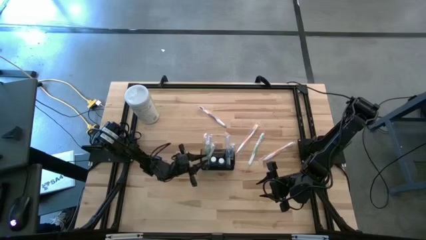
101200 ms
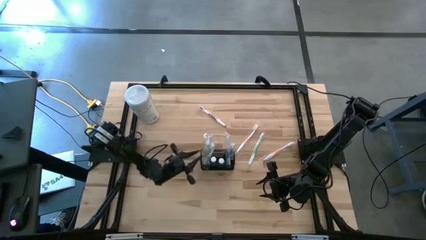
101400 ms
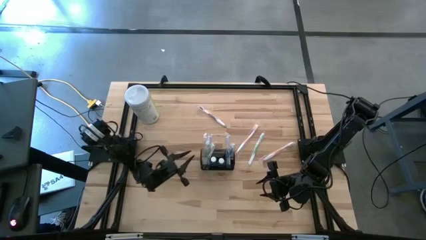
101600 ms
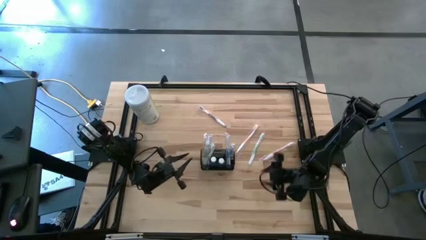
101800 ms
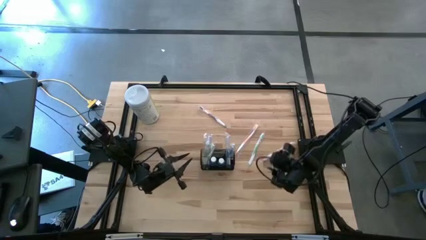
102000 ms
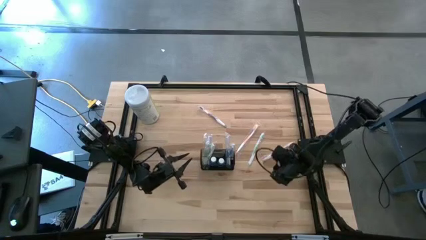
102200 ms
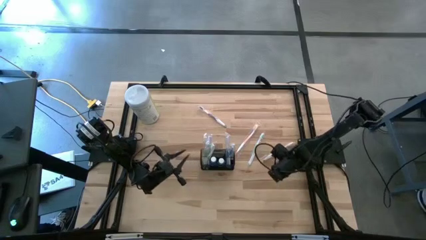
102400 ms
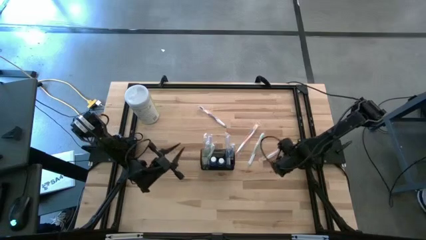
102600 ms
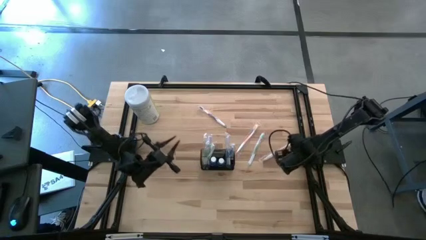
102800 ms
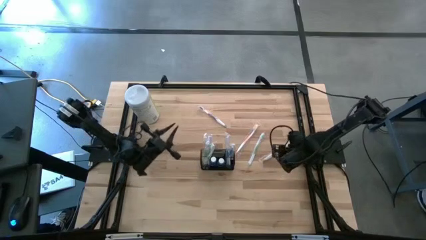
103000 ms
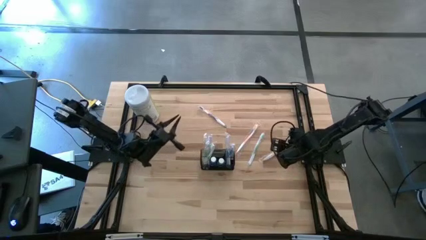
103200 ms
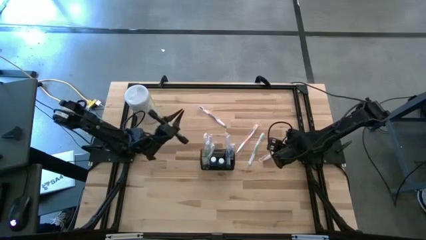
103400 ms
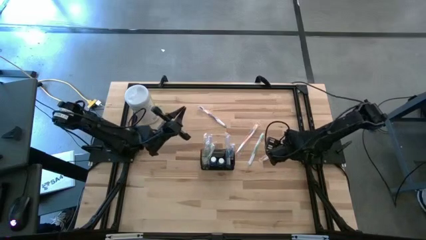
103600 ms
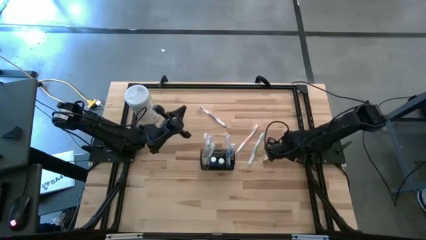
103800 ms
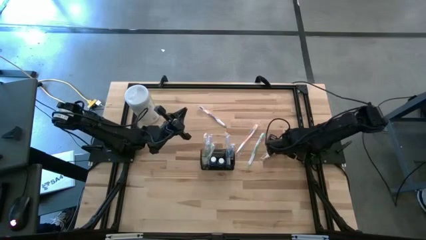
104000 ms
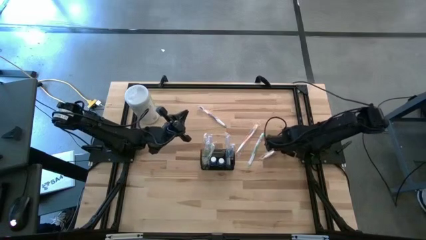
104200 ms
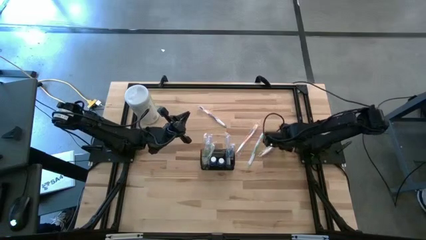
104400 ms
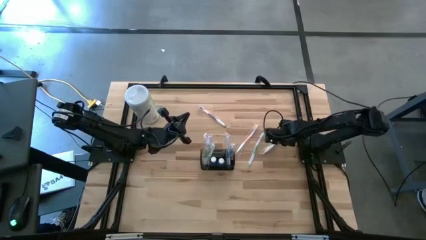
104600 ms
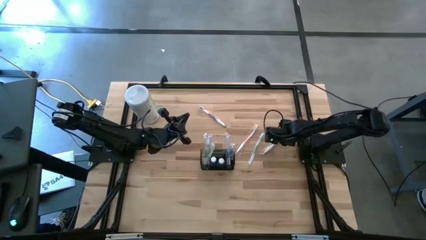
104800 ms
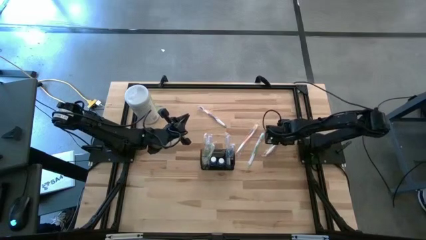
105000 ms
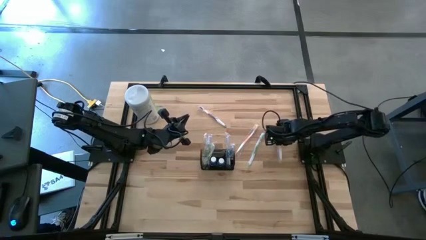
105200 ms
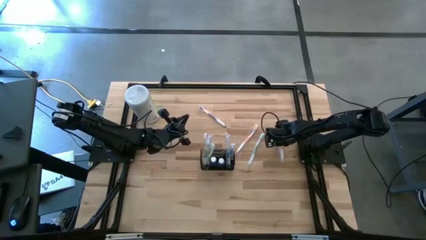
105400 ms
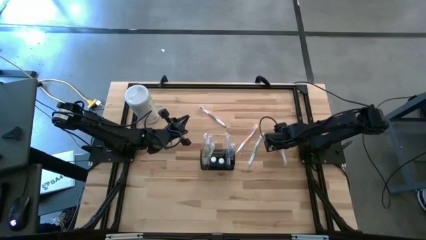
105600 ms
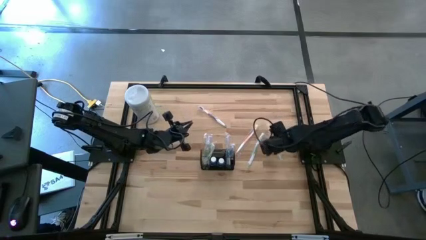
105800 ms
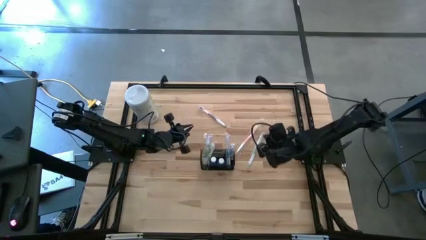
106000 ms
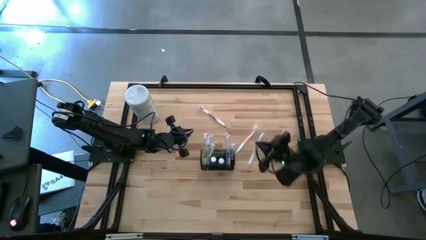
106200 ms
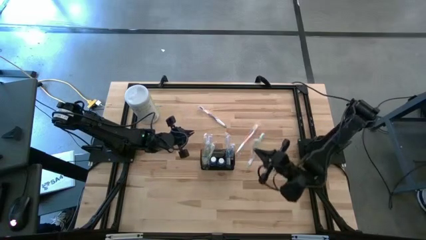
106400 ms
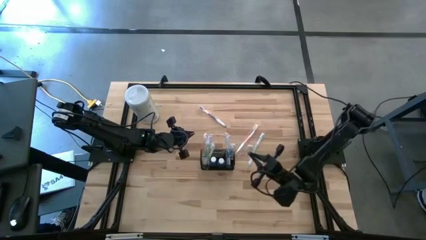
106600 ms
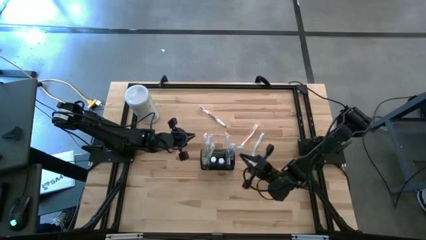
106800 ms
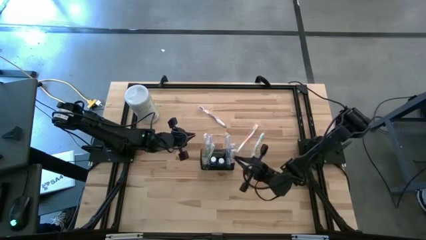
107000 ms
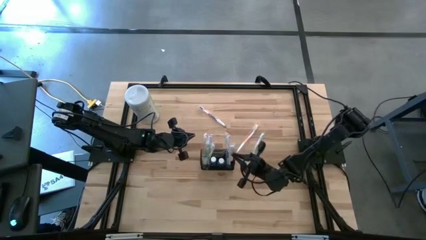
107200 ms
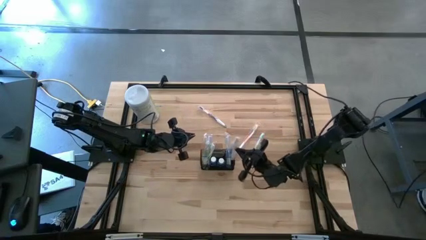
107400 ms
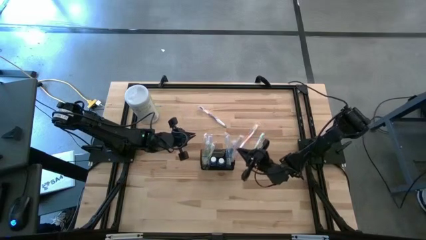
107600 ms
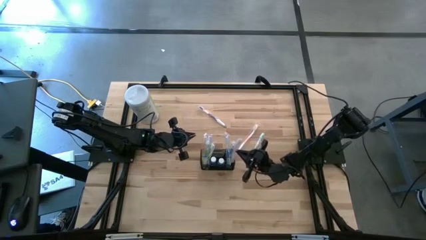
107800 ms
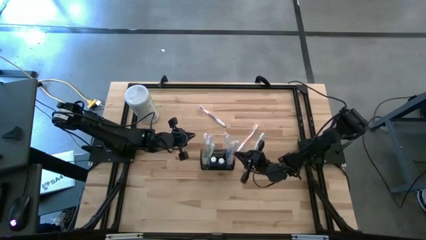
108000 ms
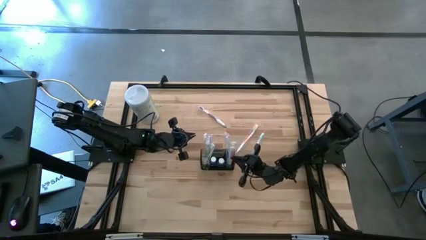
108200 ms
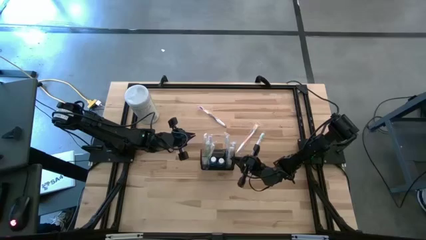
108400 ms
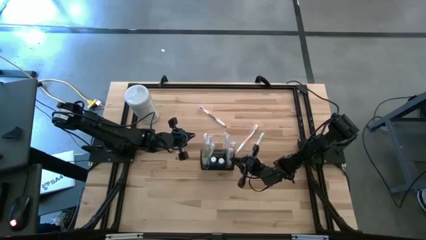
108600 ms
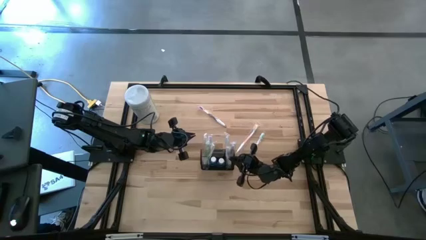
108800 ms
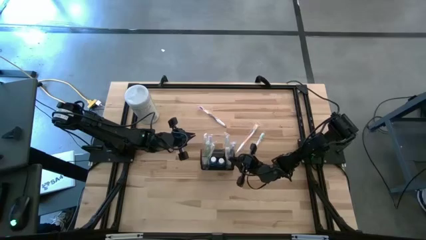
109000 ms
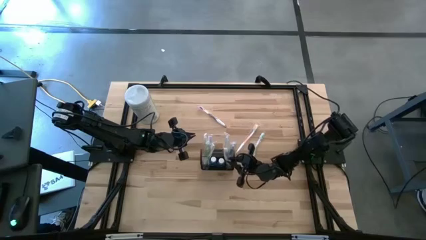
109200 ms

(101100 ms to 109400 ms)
Task: Pick & Place toothbrushing station
Put the right orange toothbrush into the black wire organizer

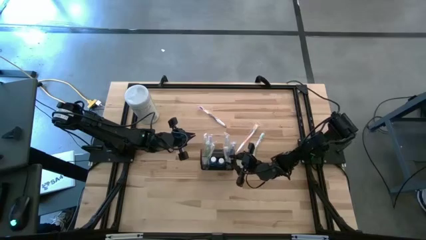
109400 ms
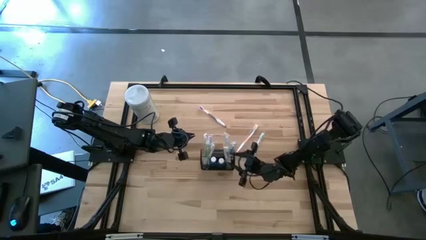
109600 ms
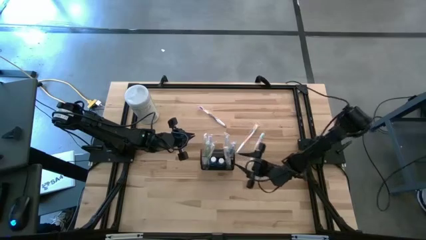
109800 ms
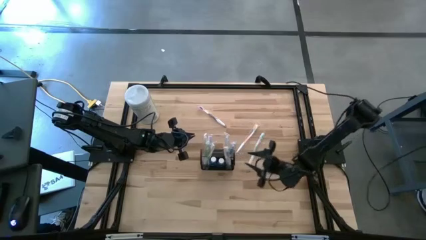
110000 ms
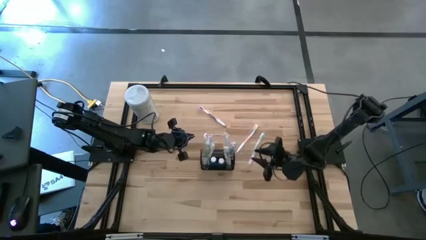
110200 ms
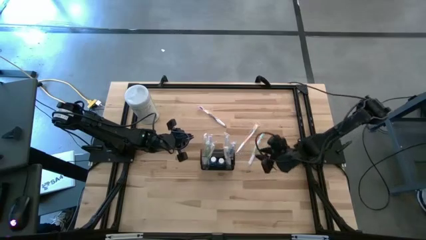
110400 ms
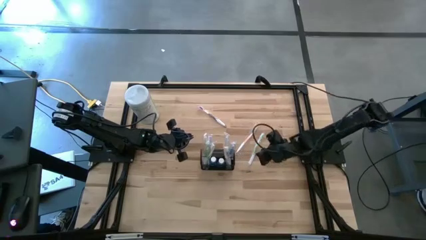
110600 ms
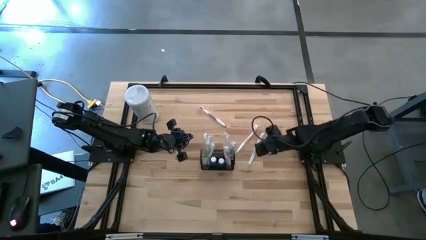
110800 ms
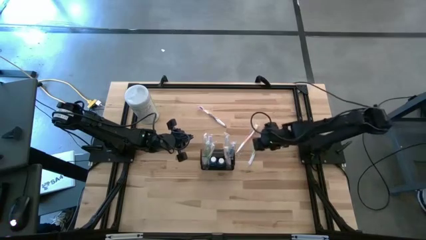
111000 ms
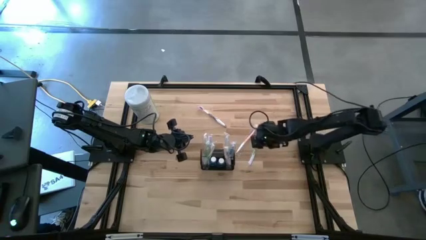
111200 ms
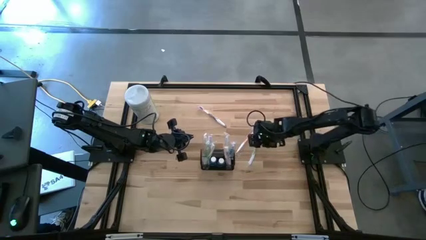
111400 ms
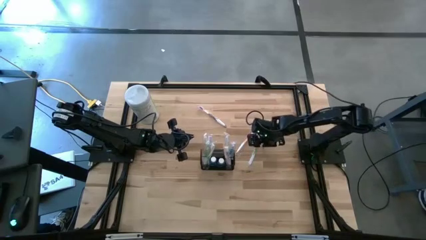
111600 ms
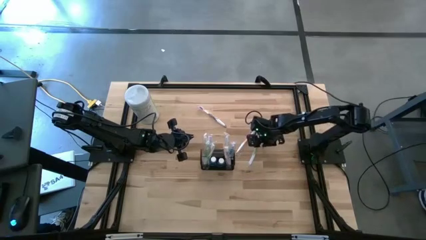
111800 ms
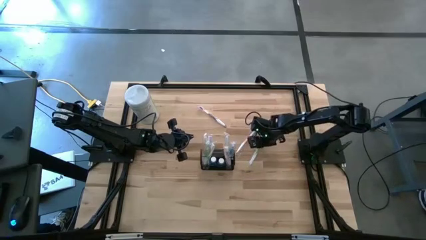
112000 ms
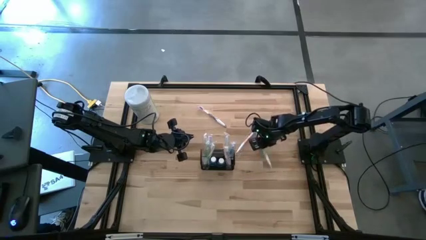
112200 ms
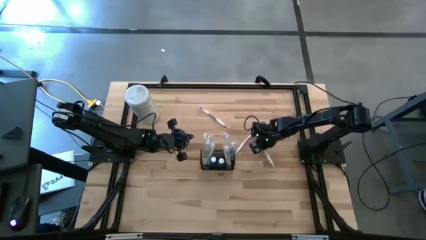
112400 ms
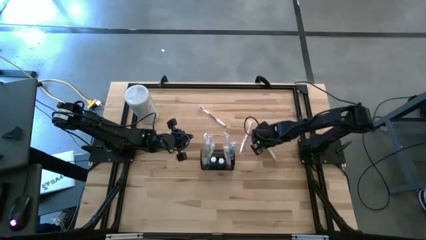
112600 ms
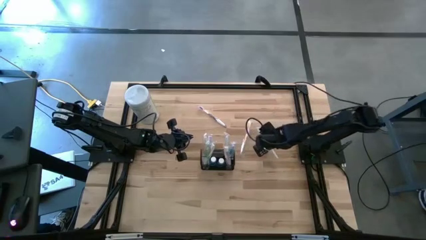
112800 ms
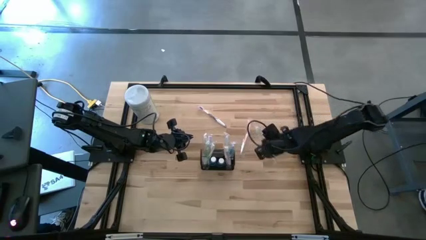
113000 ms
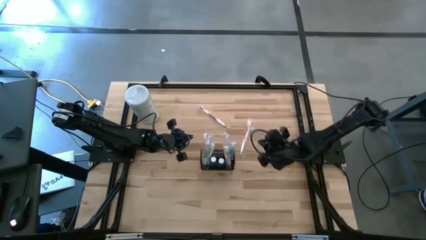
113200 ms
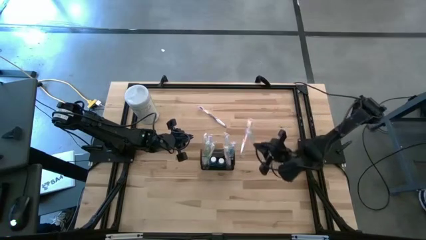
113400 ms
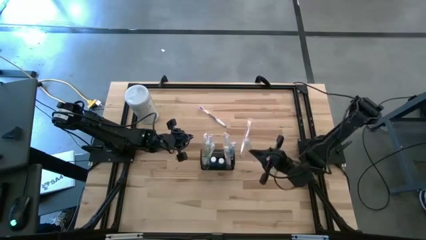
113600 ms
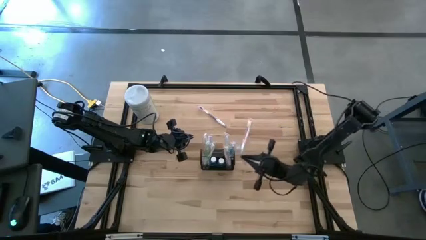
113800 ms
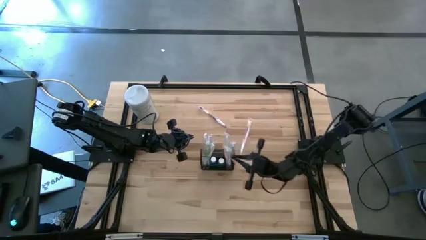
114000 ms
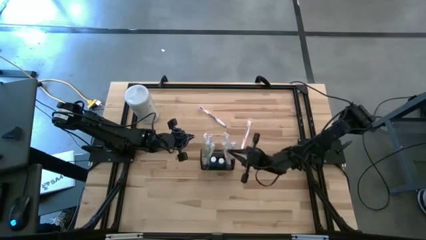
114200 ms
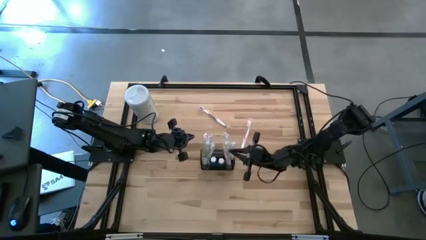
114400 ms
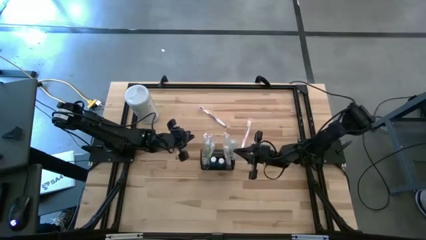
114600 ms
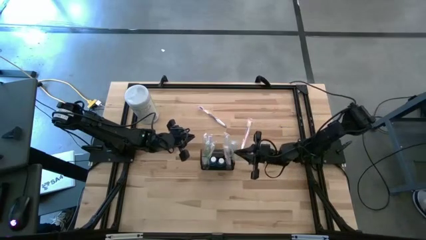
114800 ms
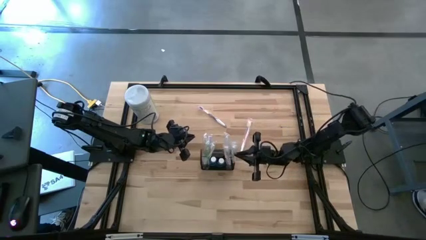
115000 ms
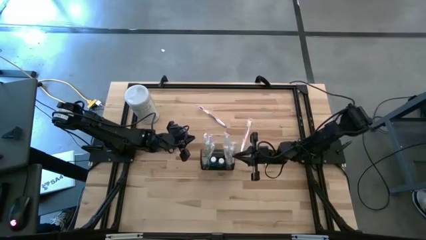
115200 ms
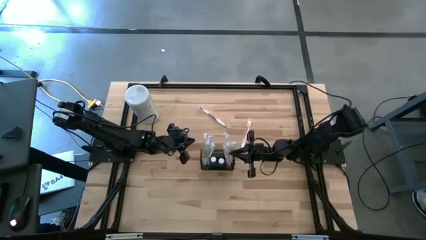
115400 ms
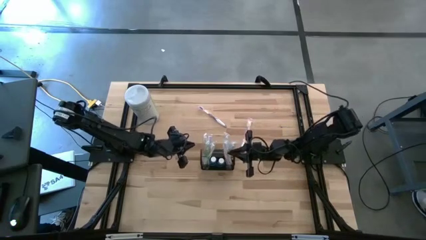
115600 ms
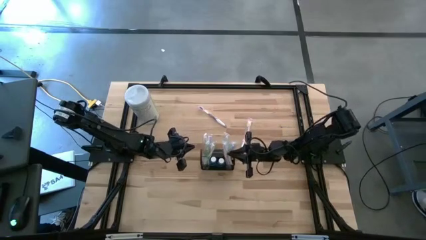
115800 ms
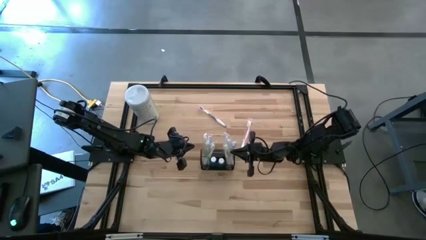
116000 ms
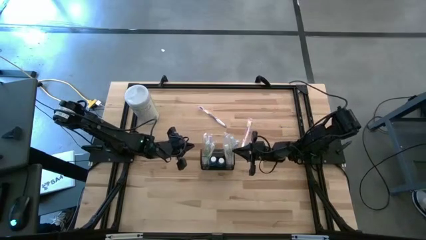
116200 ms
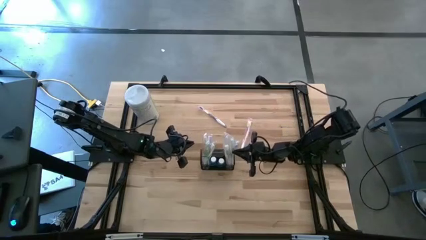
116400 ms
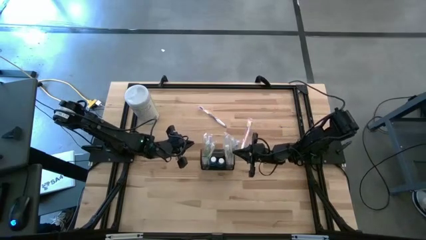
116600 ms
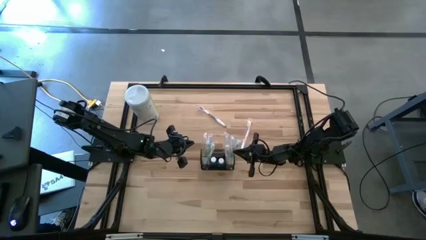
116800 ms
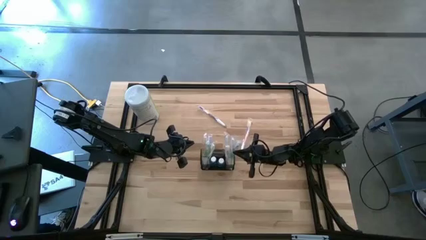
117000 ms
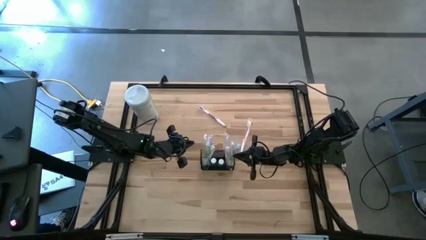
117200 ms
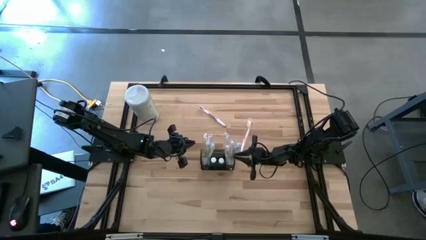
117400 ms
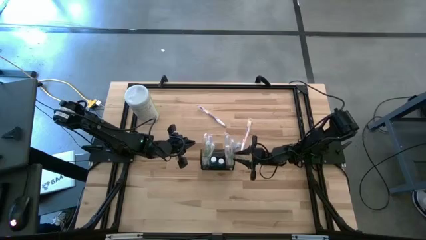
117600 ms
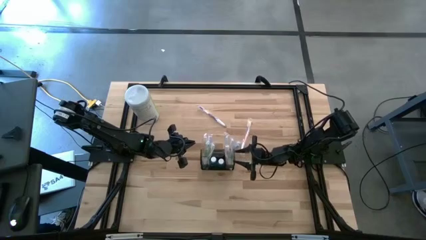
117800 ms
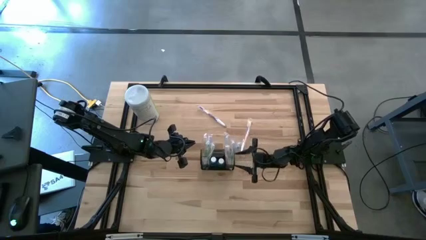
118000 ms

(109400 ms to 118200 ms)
Put the green toothbrush into the black wire organizer
